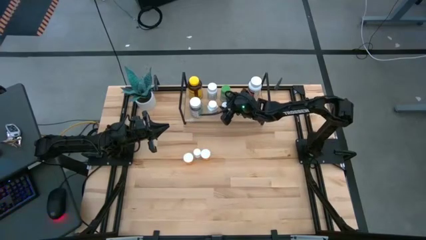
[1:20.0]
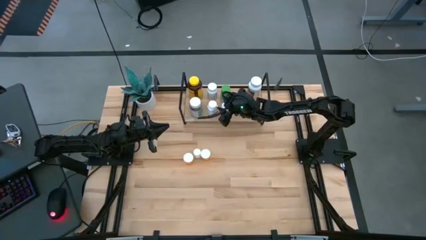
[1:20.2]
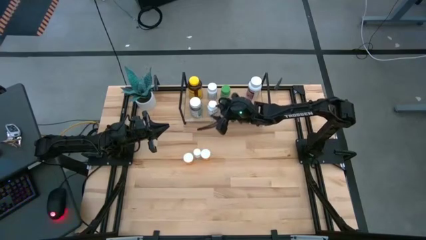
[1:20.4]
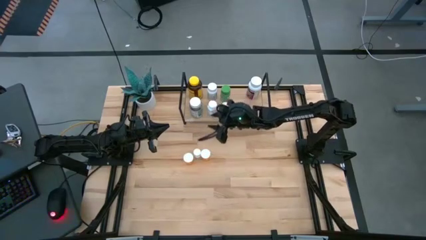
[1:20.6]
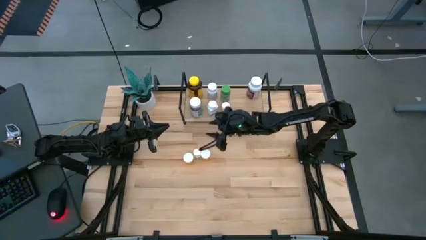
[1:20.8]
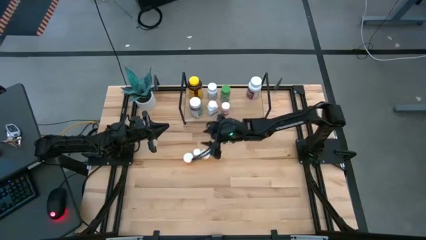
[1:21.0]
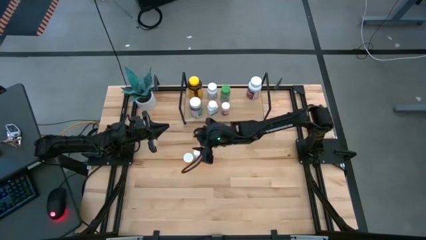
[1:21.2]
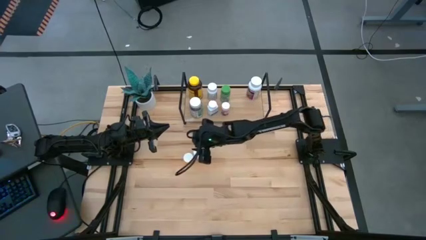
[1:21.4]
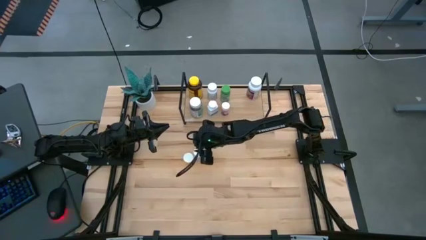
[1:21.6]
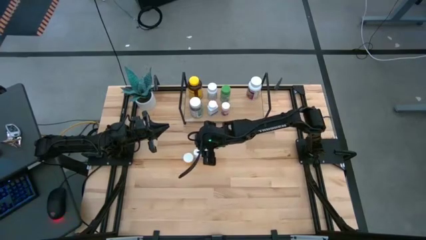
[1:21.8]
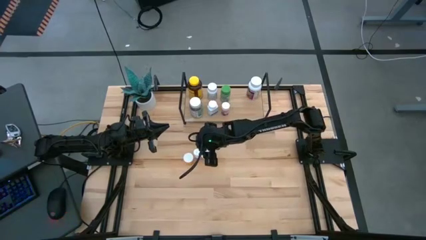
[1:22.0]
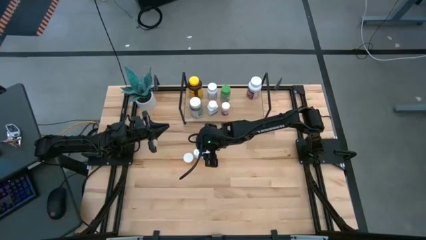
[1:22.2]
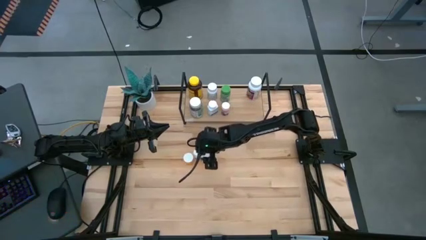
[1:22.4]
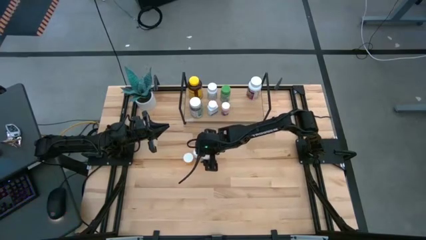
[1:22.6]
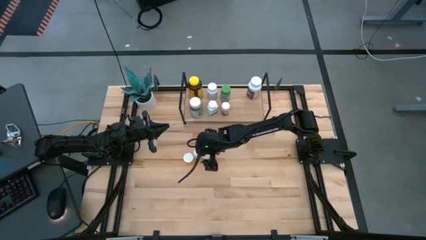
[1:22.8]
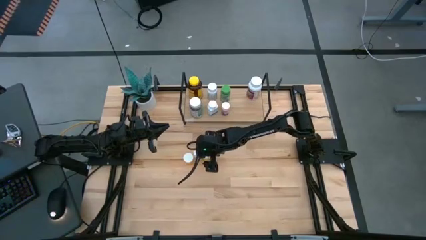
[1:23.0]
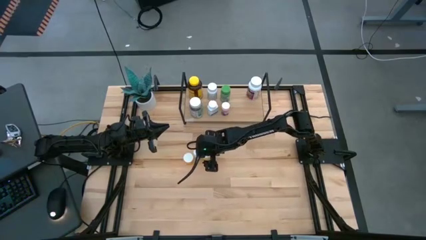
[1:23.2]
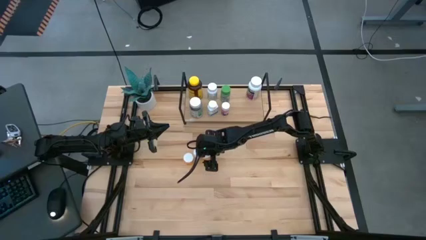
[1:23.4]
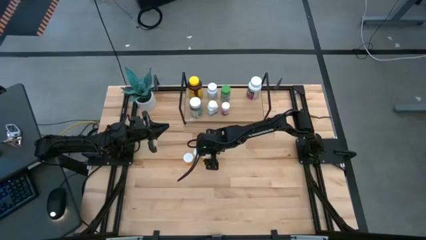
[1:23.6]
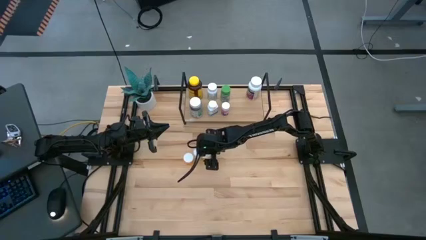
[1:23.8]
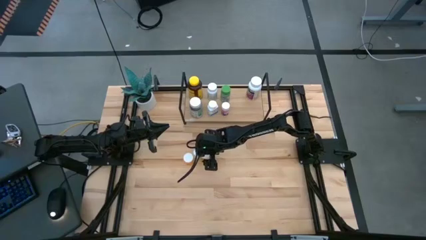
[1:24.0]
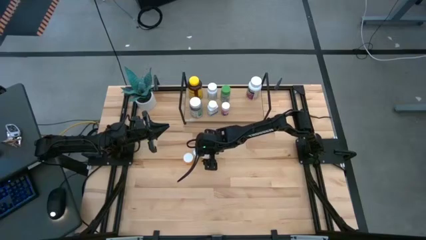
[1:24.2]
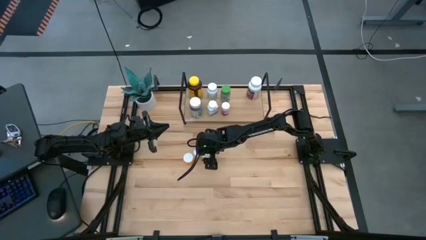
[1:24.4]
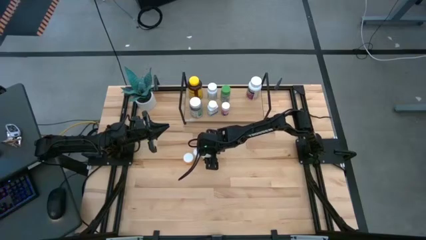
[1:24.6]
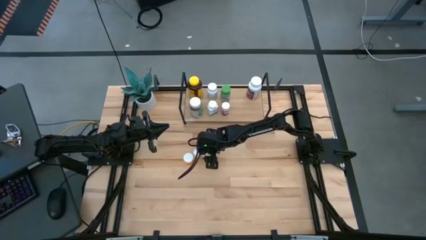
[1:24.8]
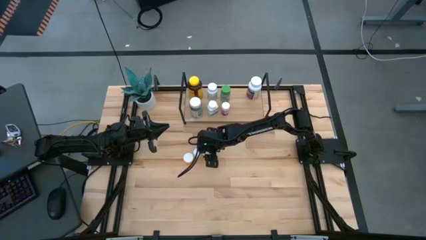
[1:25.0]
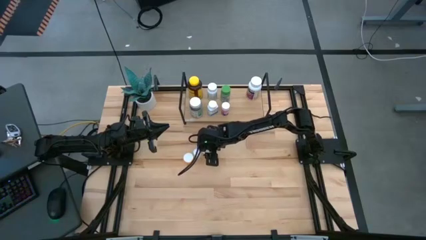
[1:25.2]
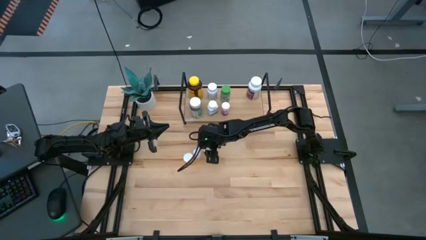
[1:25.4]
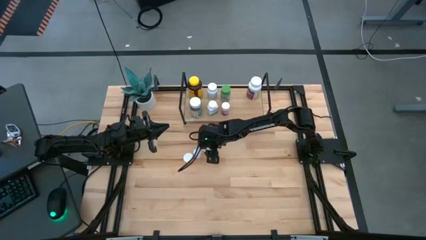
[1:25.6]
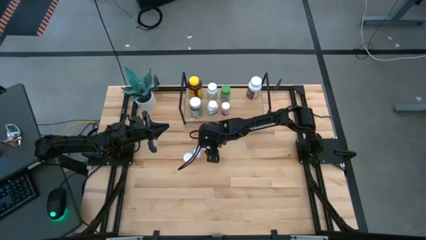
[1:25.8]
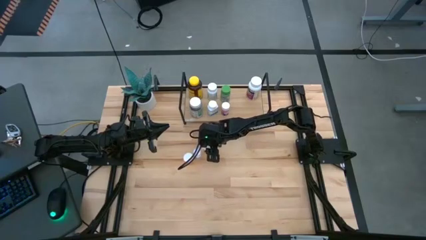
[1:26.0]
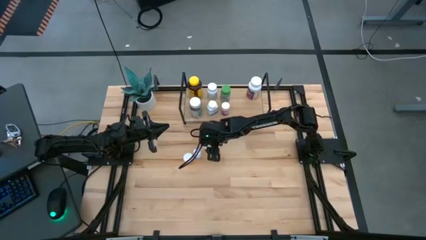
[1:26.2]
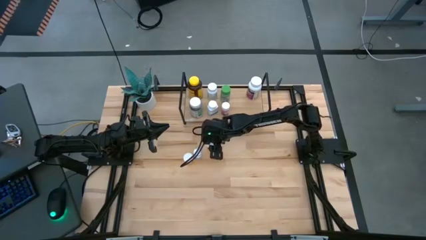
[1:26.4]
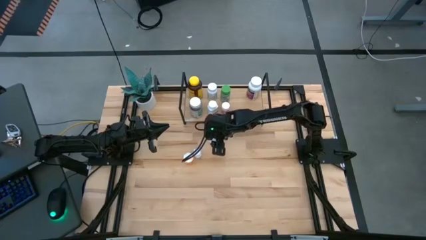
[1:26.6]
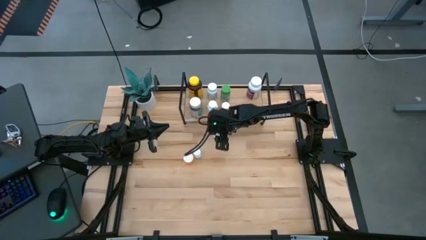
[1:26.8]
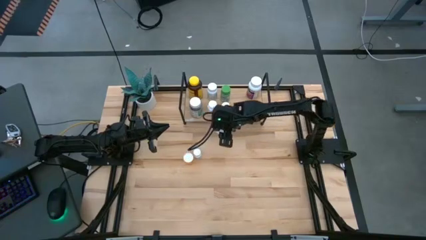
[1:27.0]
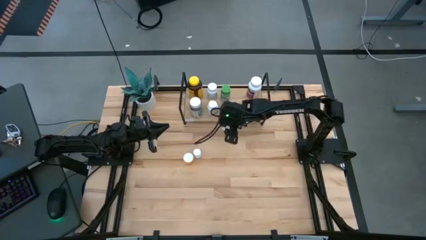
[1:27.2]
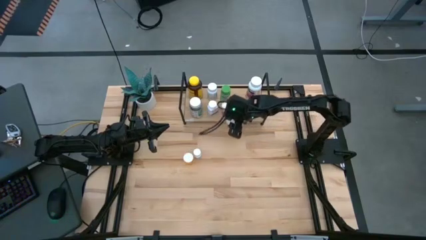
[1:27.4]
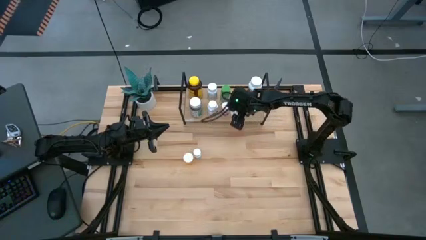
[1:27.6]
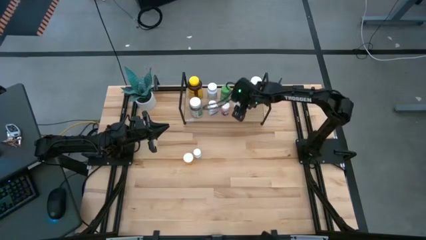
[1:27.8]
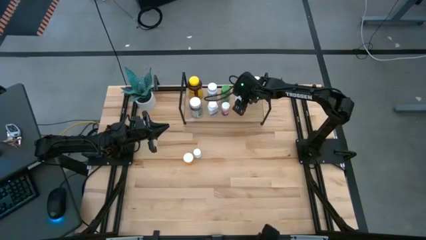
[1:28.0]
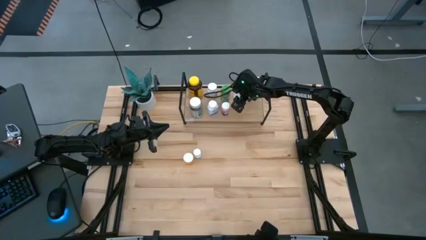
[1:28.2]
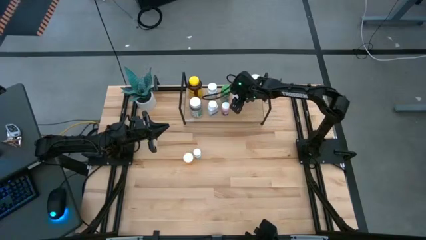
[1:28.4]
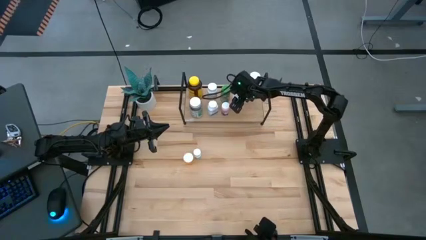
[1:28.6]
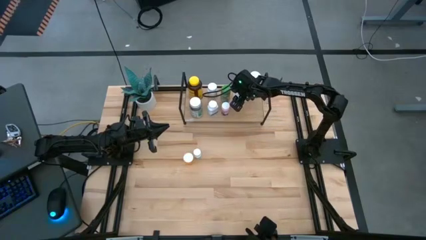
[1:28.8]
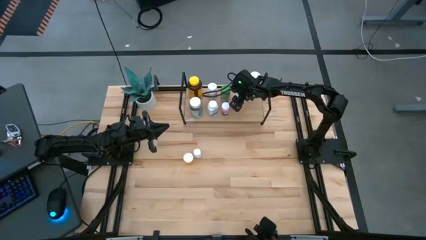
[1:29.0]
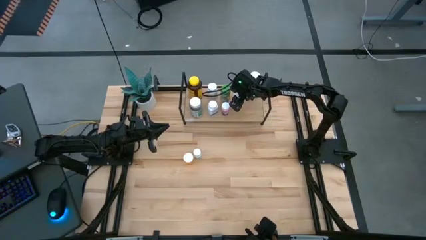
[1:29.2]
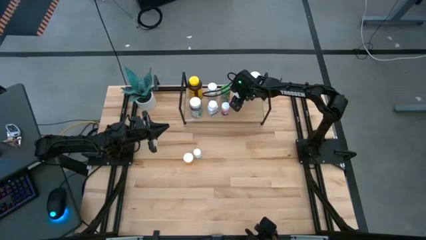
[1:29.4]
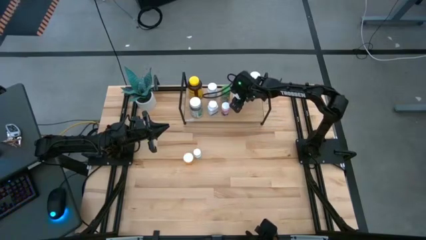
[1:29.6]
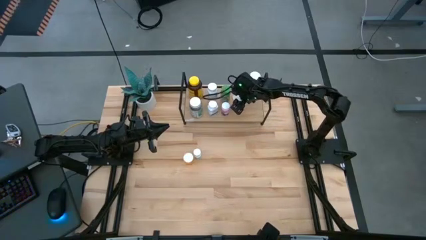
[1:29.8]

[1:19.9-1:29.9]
Task: Pick and place medicine bottles onto shelf by color
Put the right orange pill bottle on the shelf

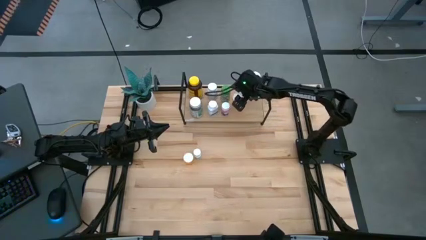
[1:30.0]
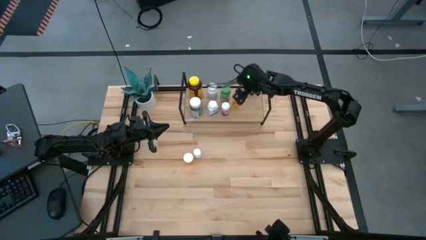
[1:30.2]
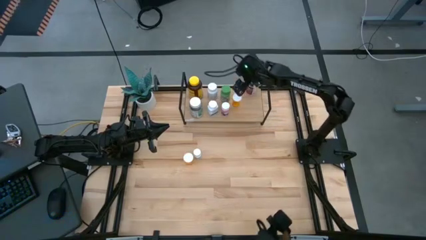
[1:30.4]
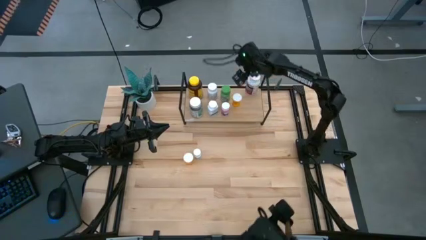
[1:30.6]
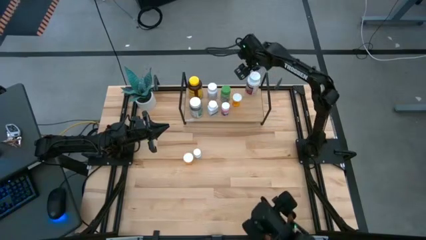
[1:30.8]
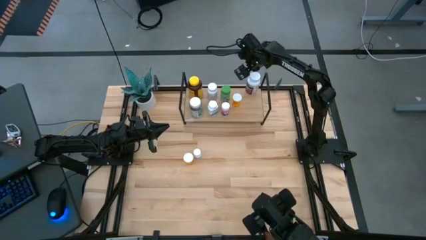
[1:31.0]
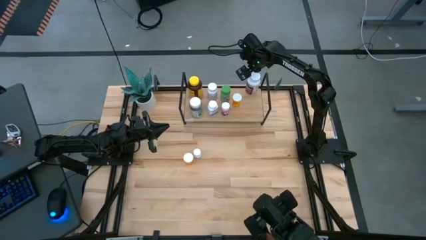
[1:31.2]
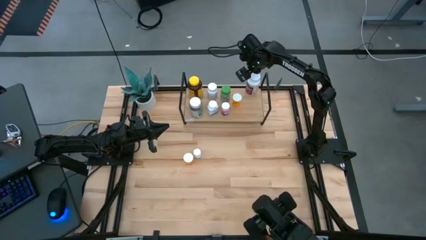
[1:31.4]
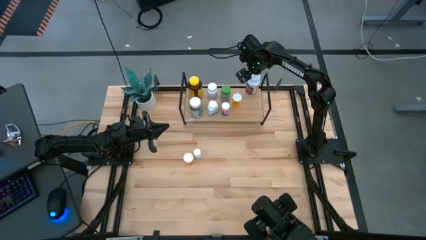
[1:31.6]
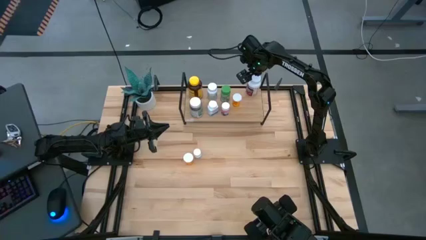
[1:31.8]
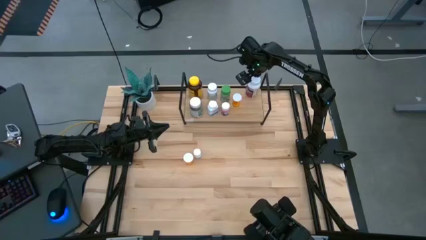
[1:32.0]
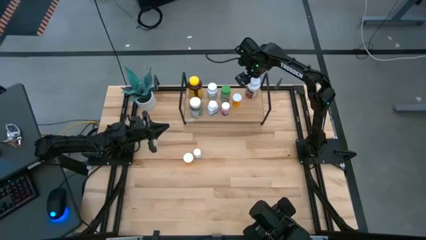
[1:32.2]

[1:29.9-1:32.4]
Adjust the white violet medicine bottle on the shelf

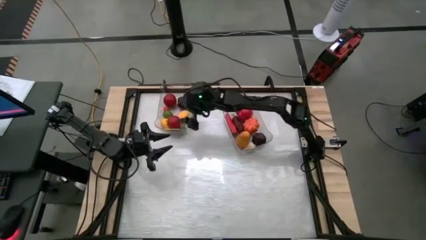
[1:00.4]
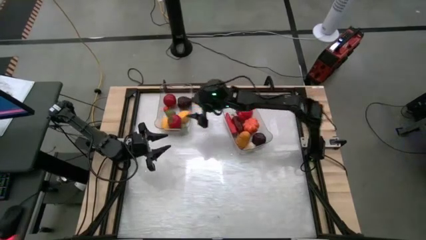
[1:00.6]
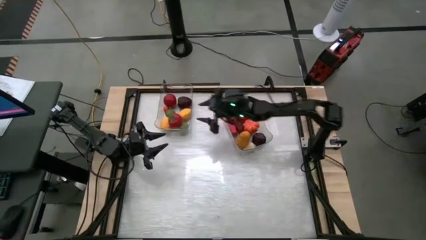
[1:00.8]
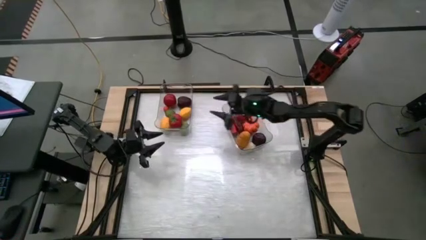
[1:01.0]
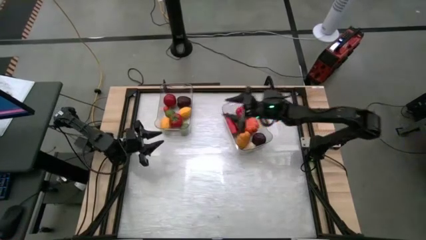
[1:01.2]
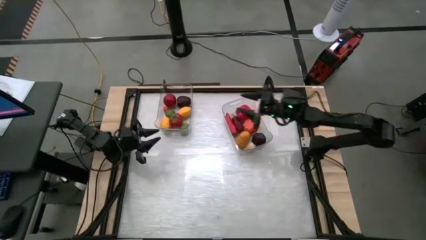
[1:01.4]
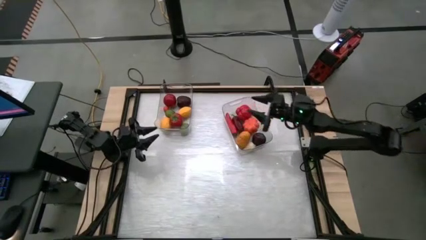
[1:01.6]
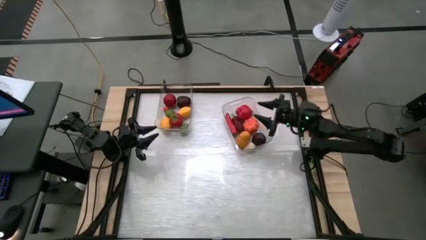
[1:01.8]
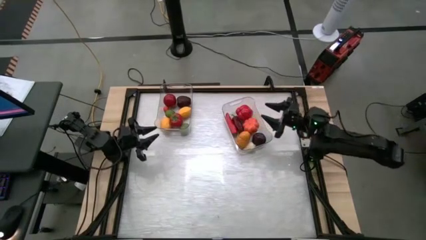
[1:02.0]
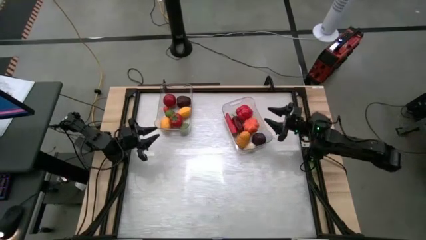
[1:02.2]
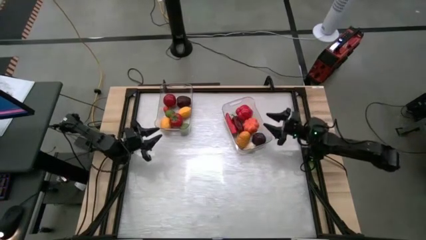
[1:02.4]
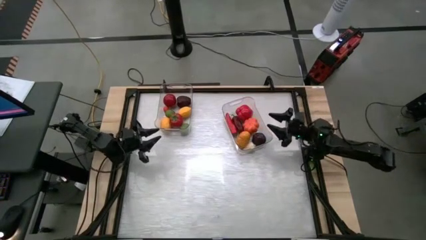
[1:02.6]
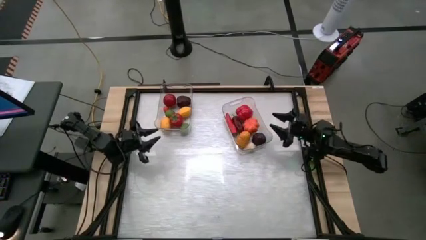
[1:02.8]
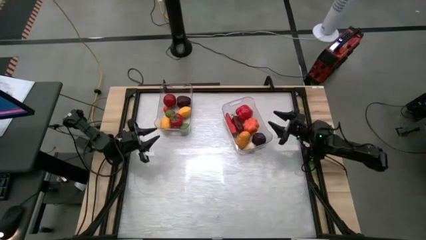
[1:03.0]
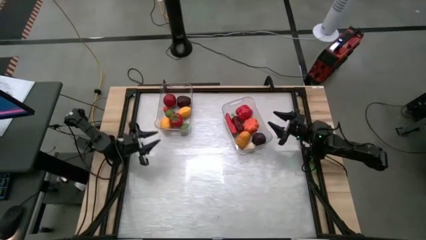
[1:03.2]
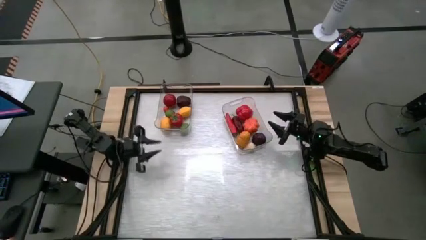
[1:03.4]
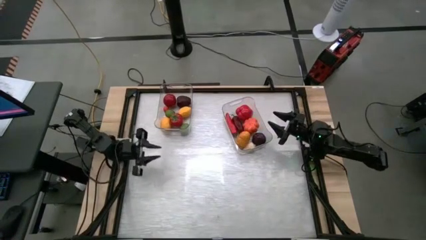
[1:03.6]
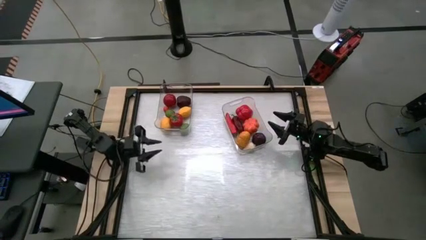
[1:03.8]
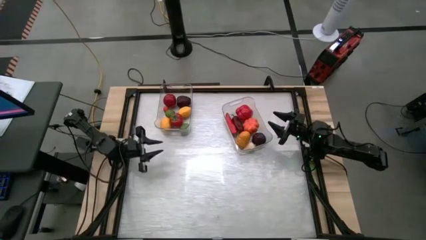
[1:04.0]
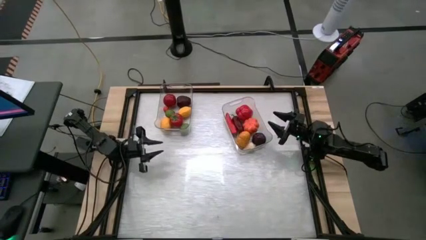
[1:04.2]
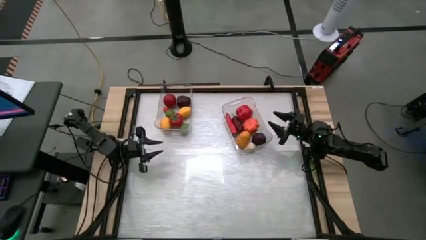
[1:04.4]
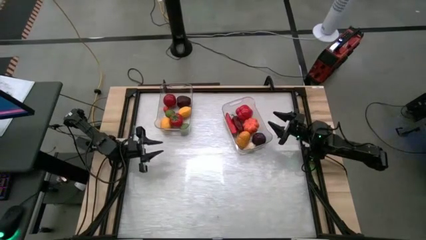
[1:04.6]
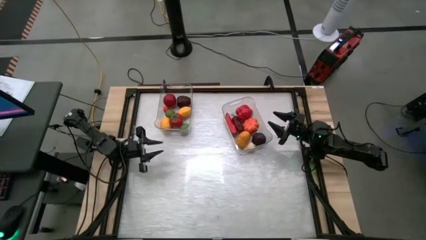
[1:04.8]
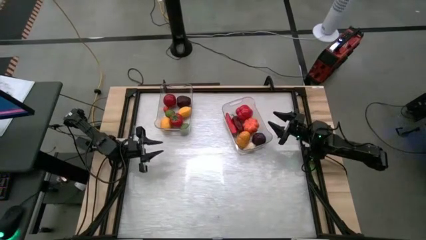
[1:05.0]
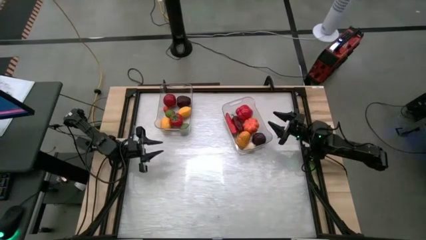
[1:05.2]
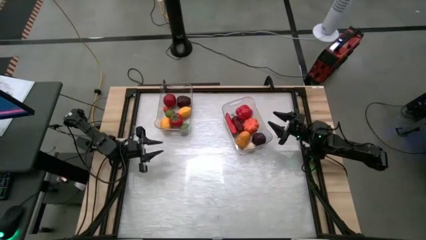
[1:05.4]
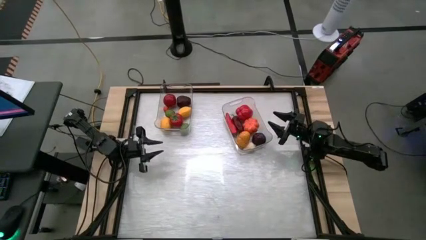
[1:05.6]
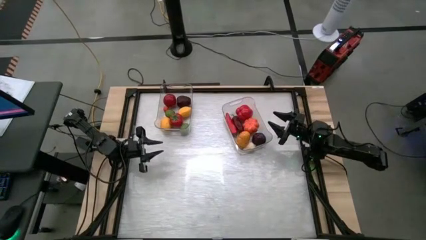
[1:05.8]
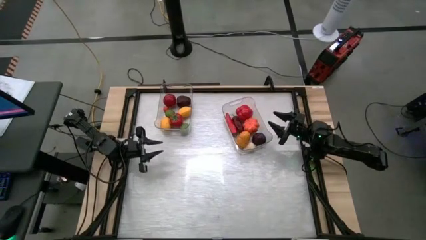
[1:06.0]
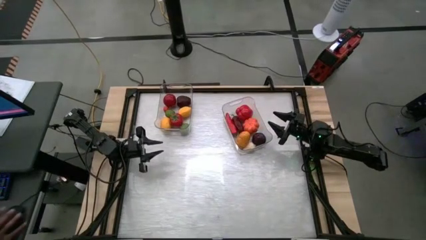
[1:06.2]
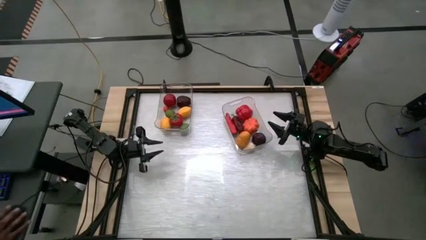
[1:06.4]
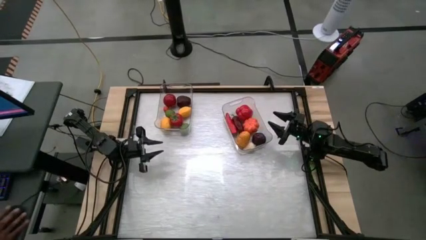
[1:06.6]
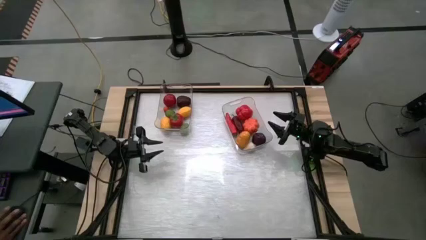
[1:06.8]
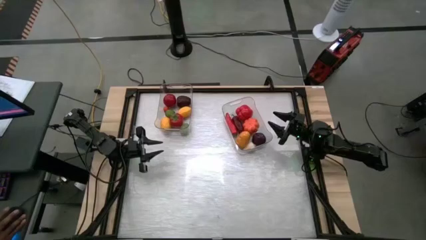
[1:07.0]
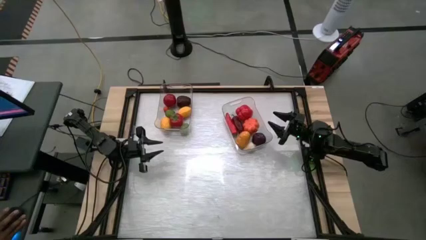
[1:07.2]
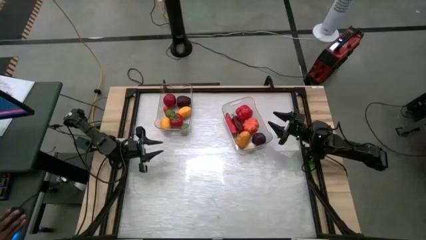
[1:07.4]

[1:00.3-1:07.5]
Task: Sort produce into baskets
Return to home position
